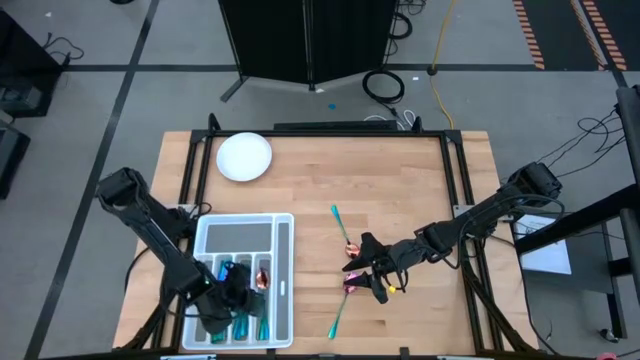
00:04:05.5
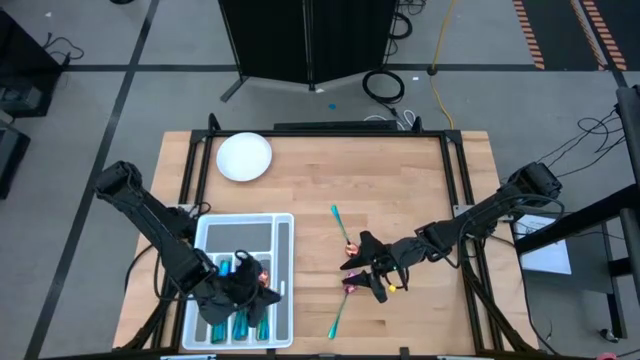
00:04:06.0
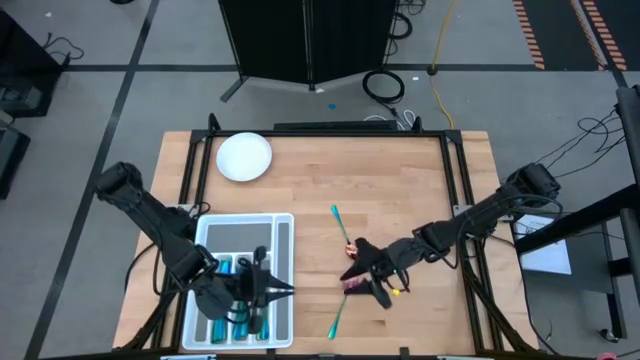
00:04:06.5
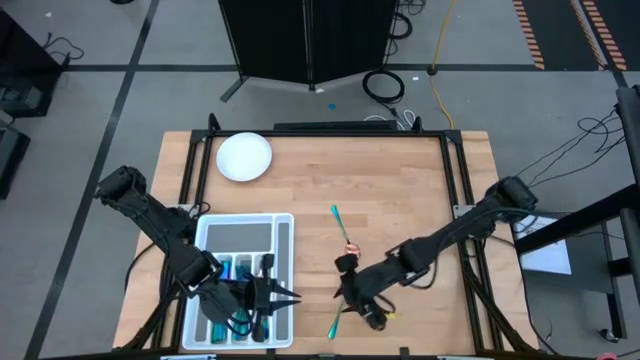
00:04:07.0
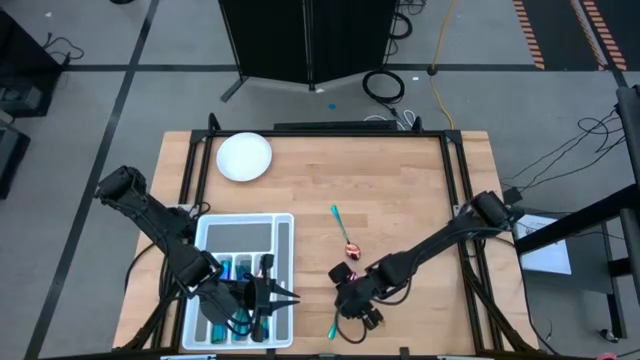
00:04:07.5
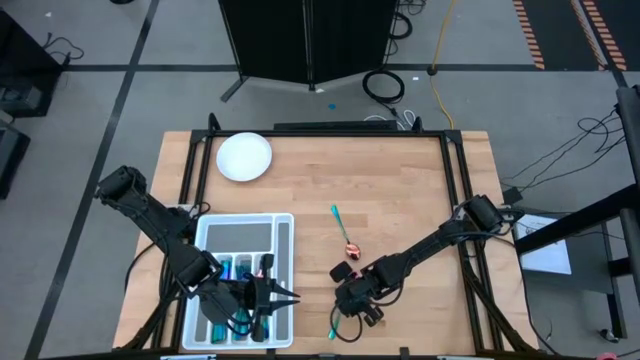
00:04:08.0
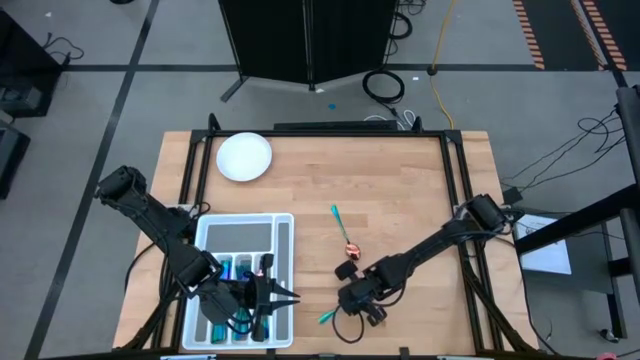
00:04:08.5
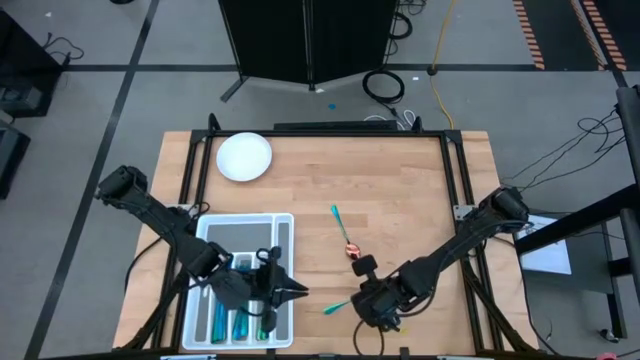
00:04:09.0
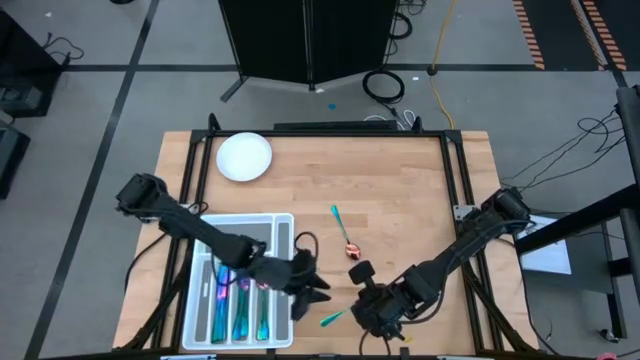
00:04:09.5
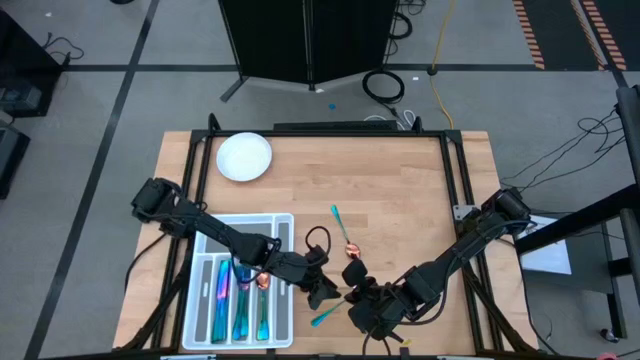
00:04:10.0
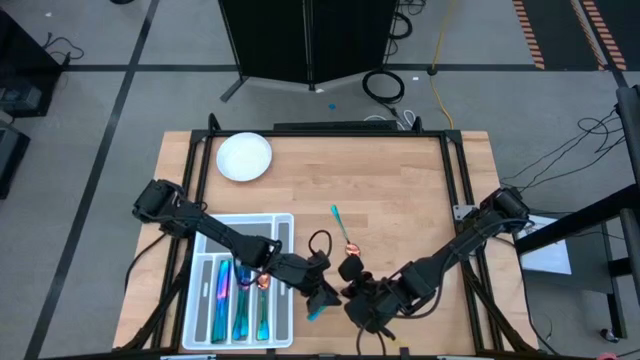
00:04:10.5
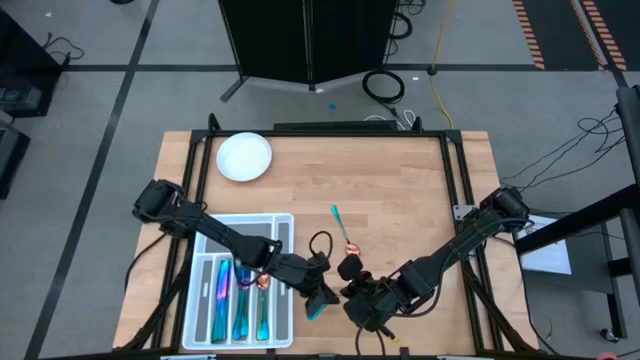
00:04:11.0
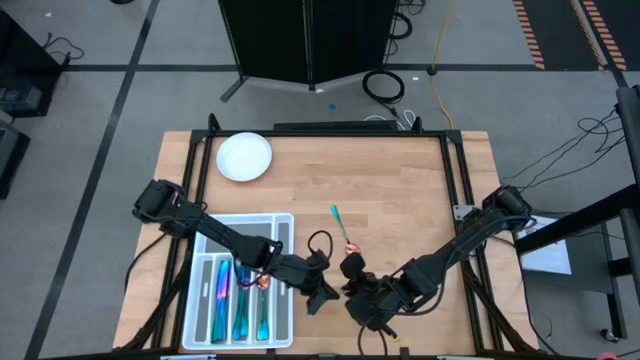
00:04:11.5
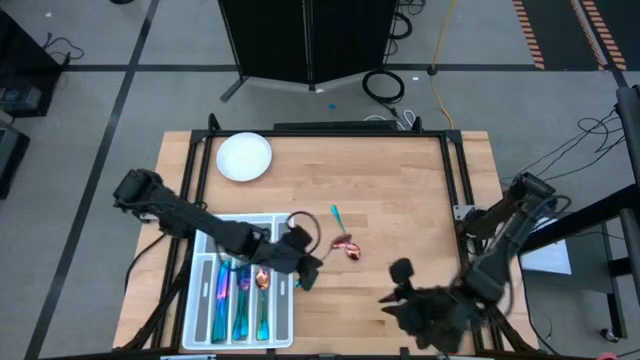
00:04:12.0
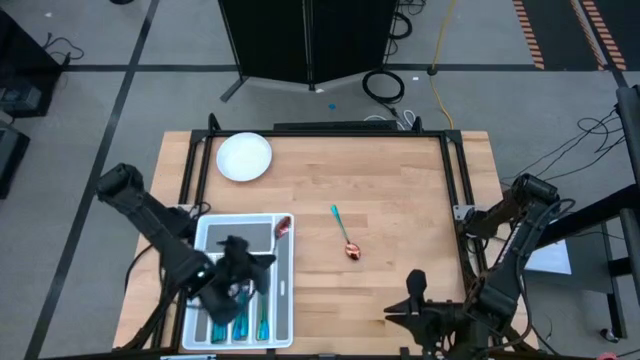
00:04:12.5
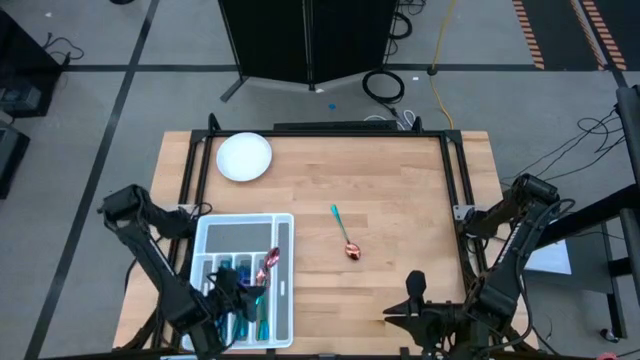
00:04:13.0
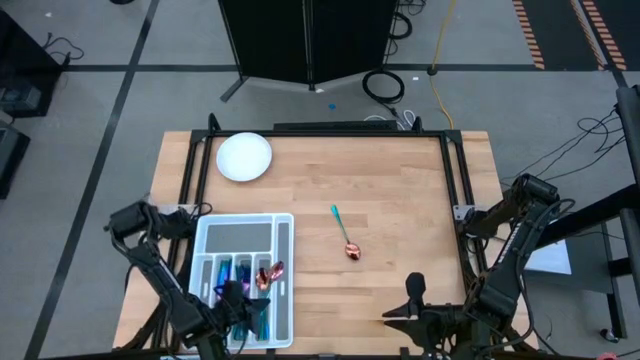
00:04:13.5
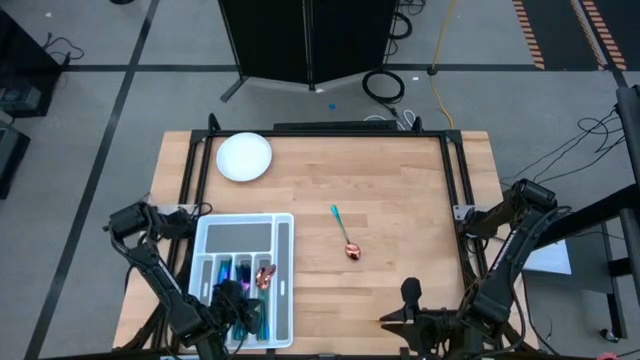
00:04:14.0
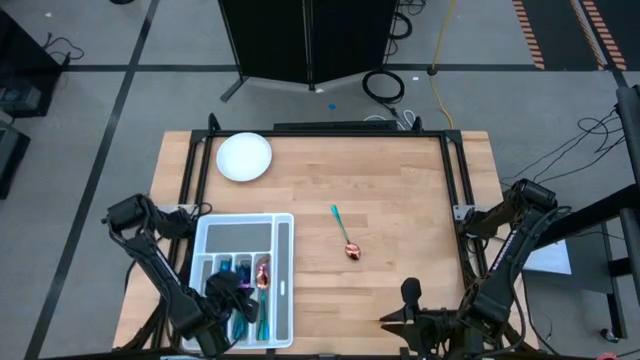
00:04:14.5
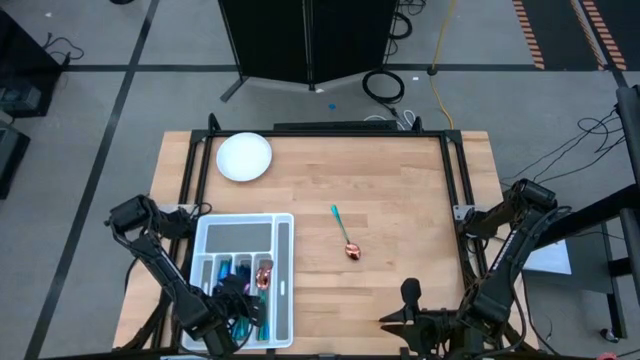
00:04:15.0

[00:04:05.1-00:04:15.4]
Task: Sort silverware
Put the iridescent blue spoon in the silverware tray

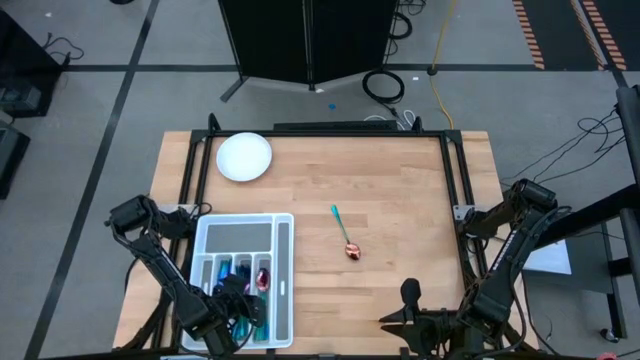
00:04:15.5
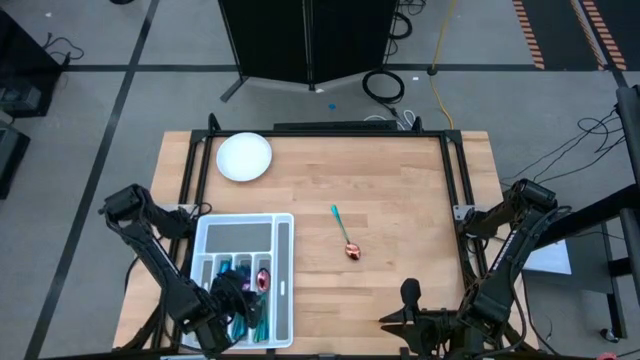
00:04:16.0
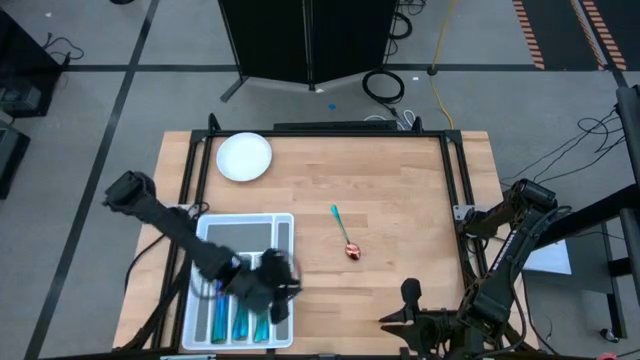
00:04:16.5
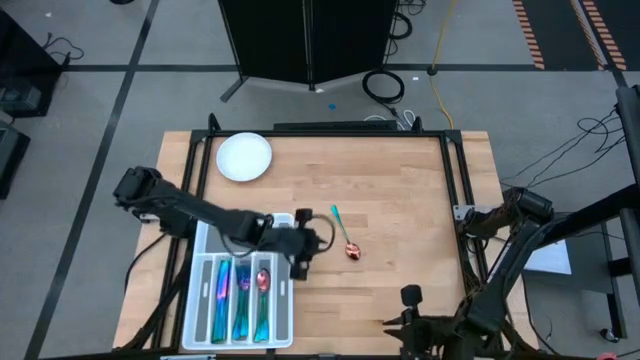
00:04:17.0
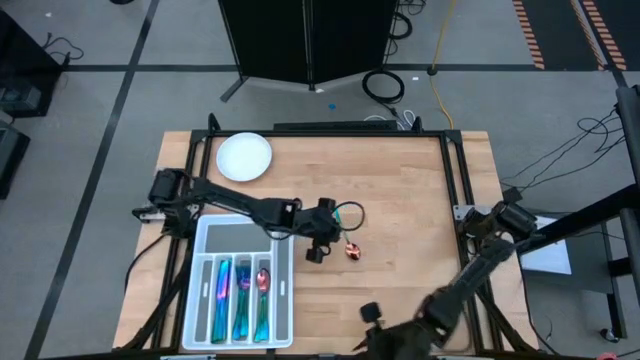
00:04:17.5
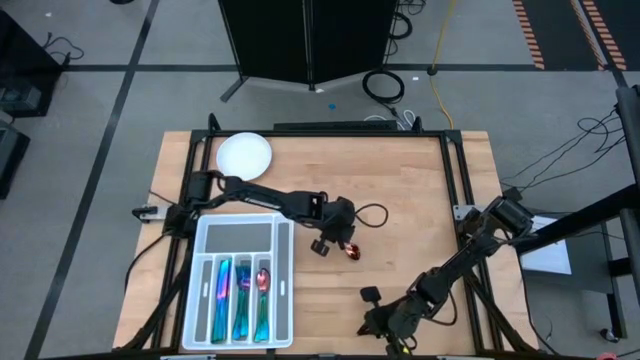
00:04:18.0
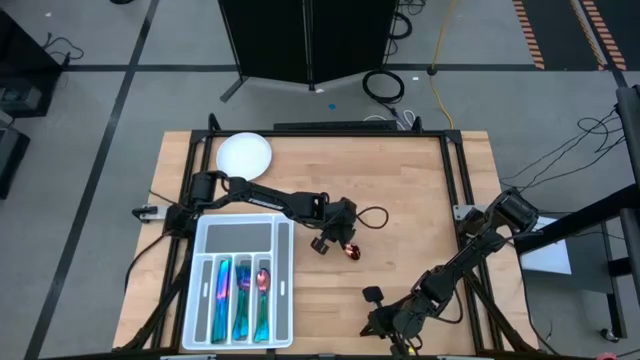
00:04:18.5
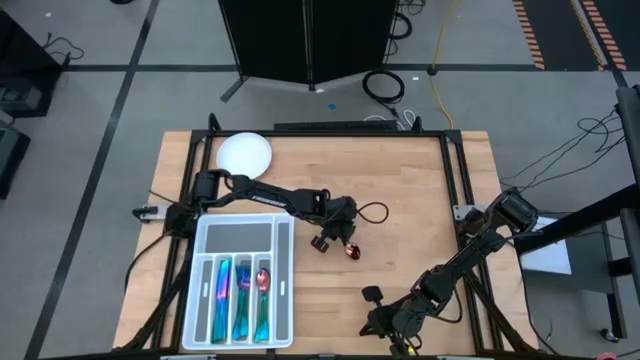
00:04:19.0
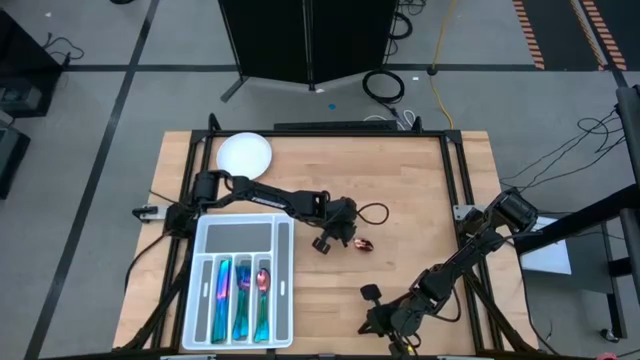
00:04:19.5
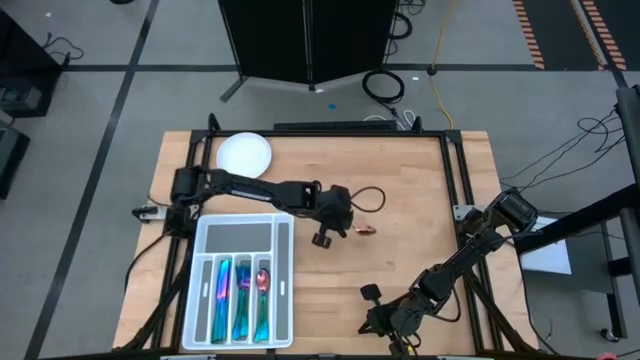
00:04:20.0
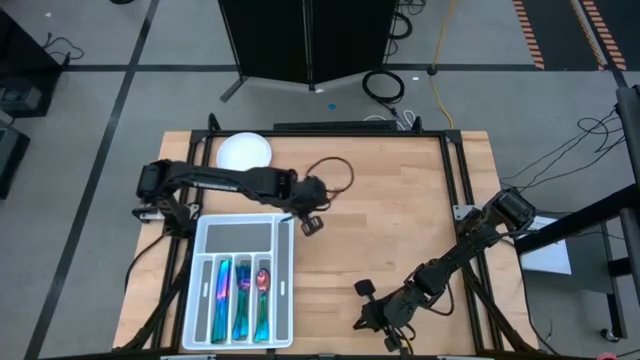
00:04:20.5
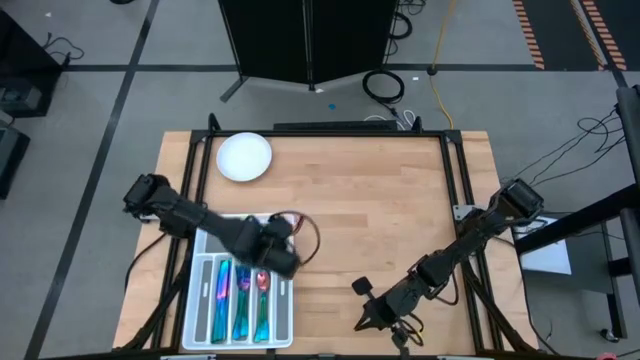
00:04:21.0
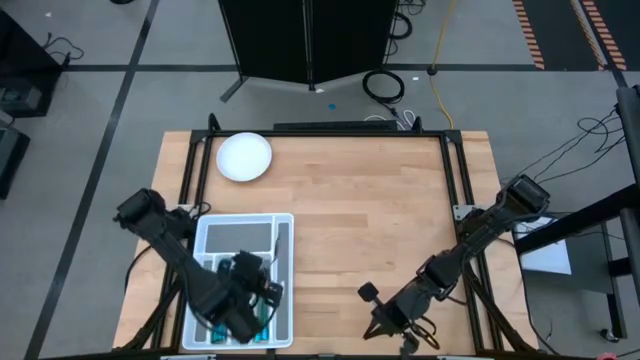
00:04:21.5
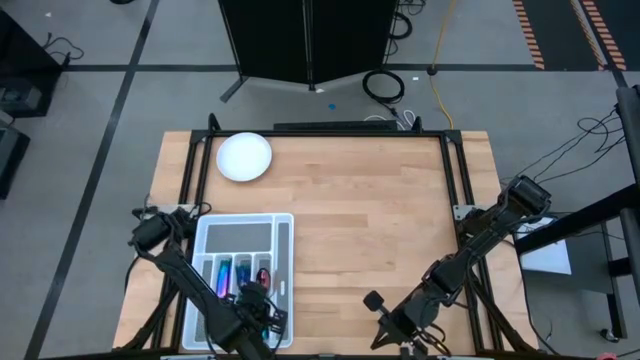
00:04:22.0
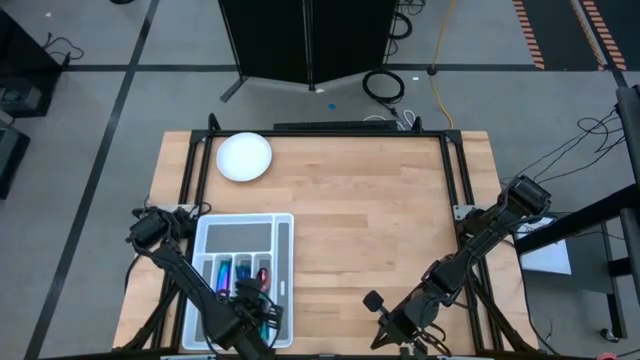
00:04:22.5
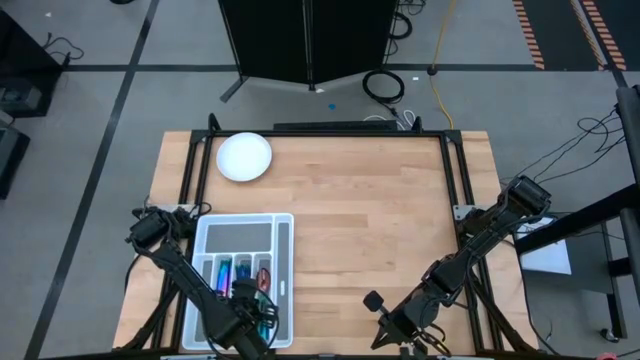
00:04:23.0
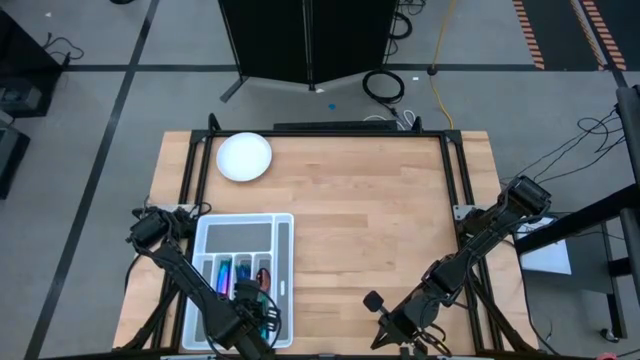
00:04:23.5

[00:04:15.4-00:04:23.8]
Put the iridescent blue spoon in the silverware tray

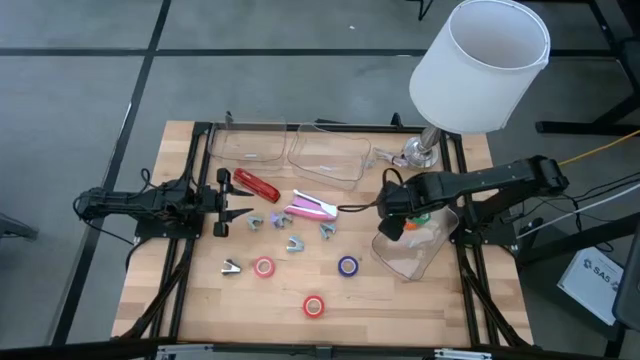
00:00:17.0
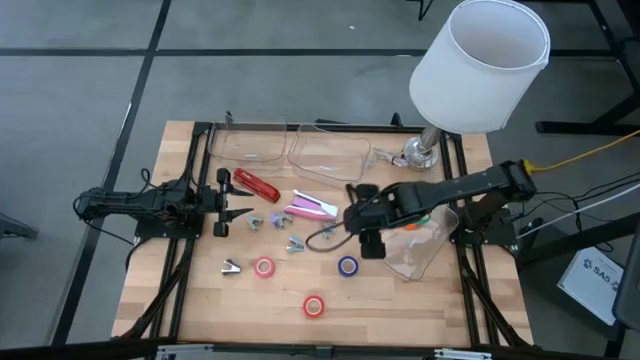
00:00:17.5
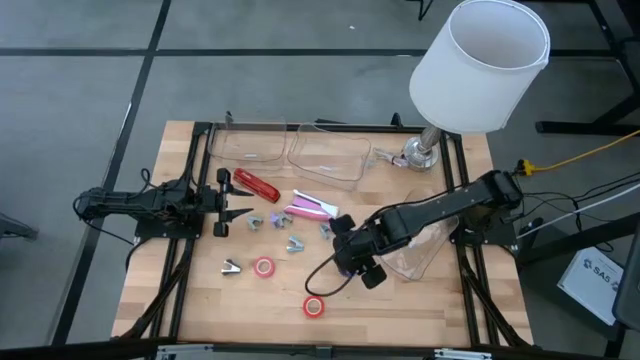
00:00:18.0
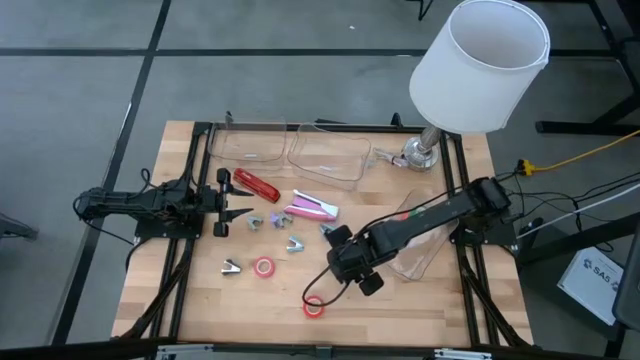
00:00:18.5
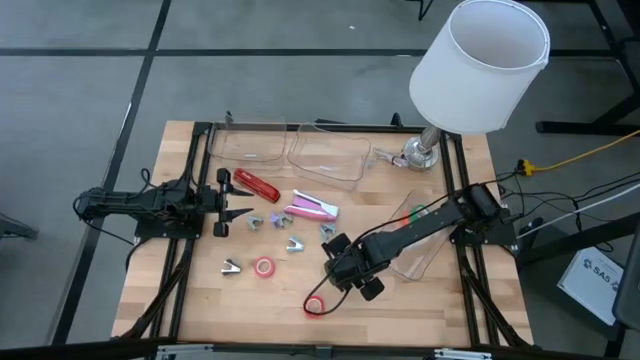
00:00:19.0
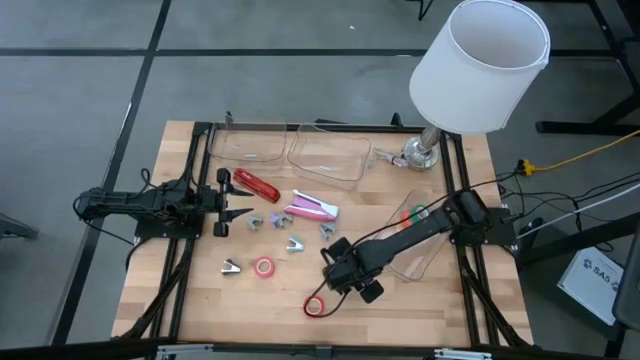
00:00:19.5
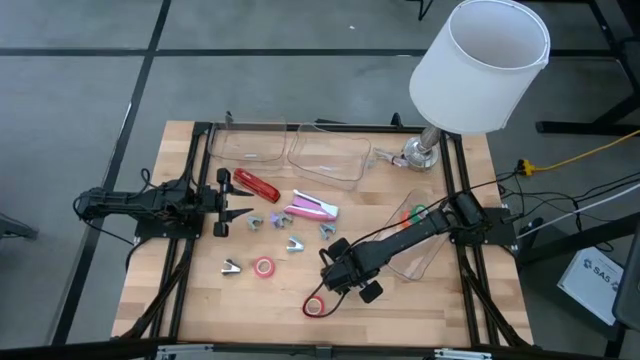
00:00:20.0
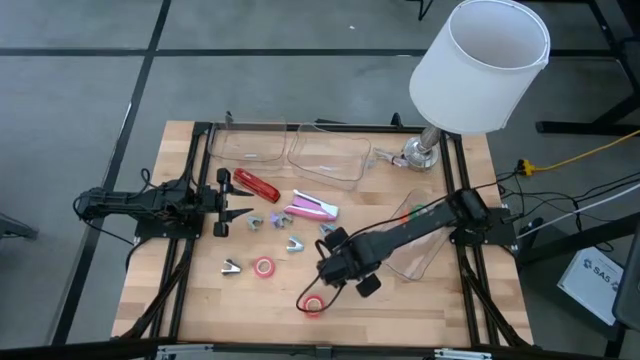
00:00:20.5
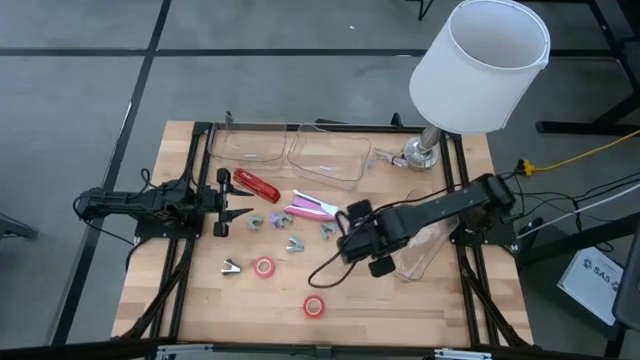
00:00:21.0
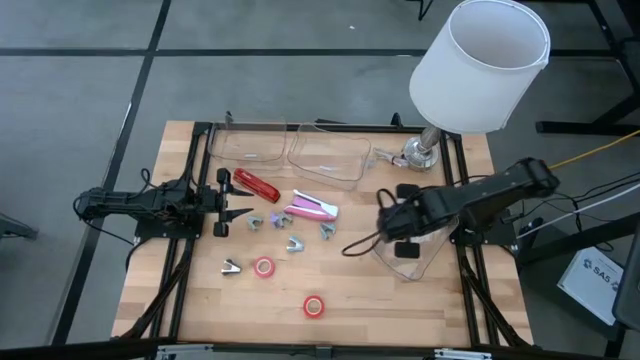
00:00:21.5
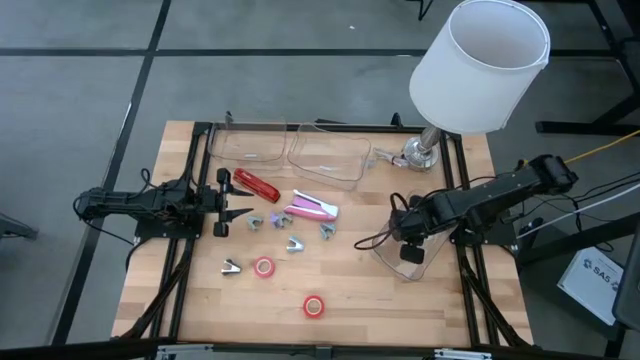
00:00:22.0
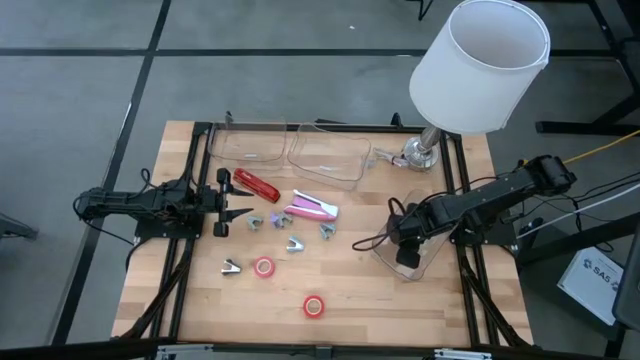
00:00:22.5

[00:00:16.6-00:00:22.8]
Task: Pick and place Stapler, Stapler remover, tape
Put the blue tape into the bottom transparent bin
